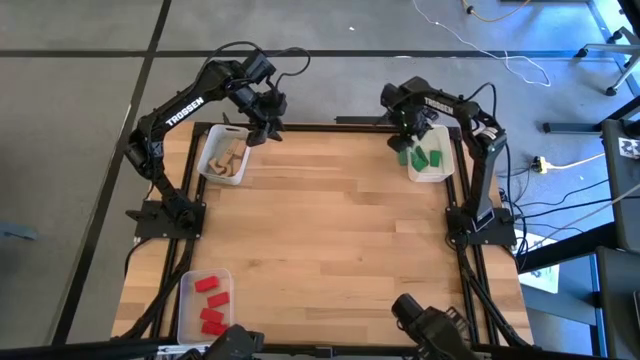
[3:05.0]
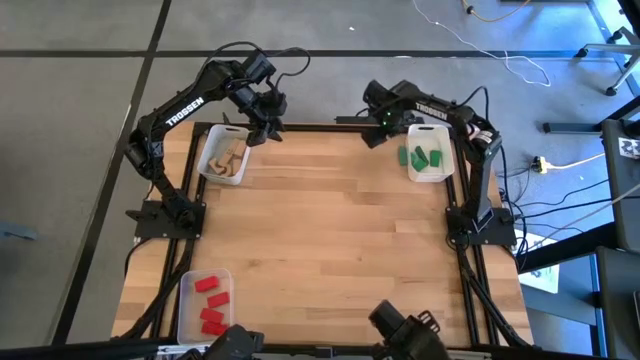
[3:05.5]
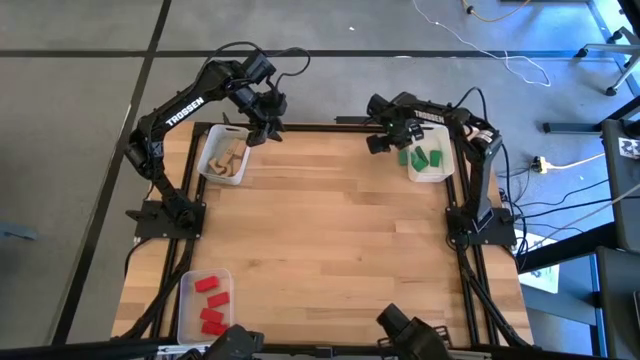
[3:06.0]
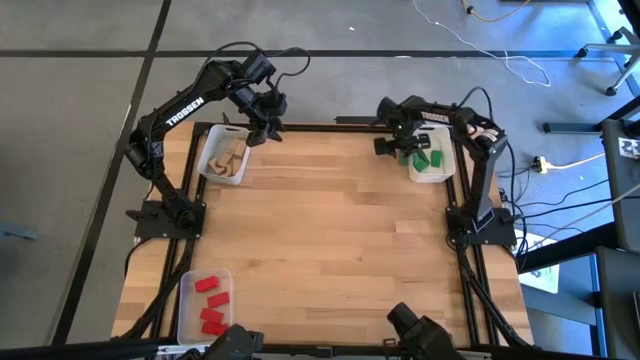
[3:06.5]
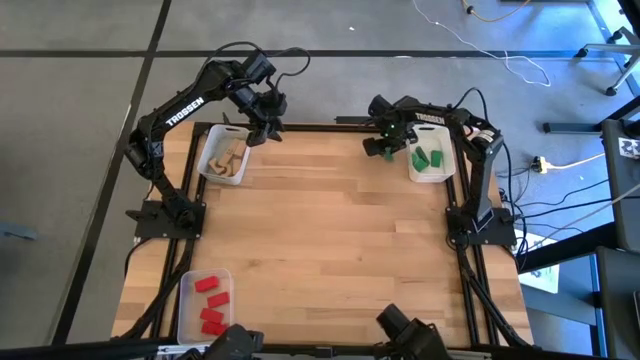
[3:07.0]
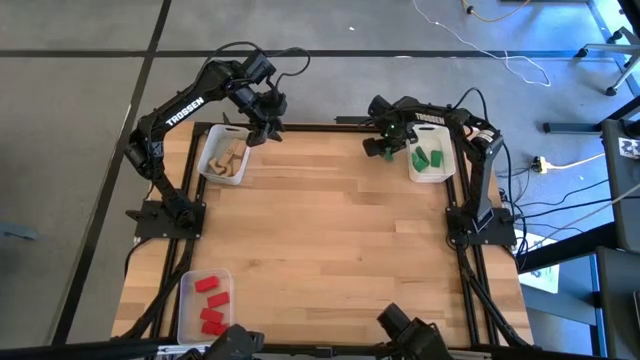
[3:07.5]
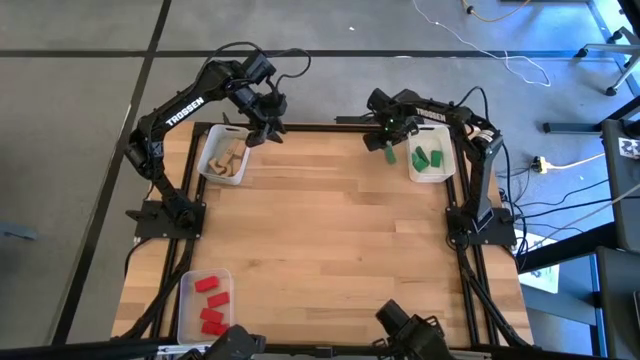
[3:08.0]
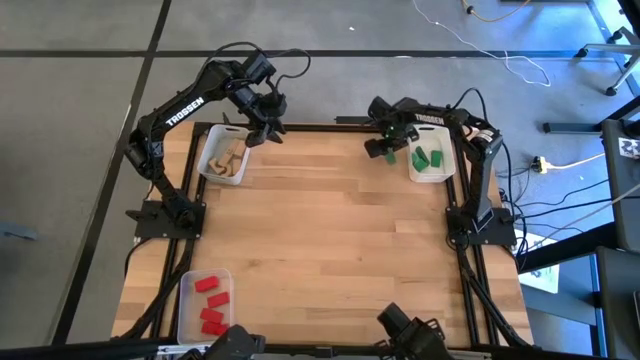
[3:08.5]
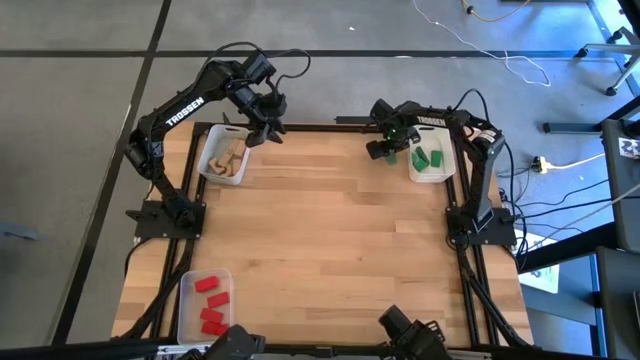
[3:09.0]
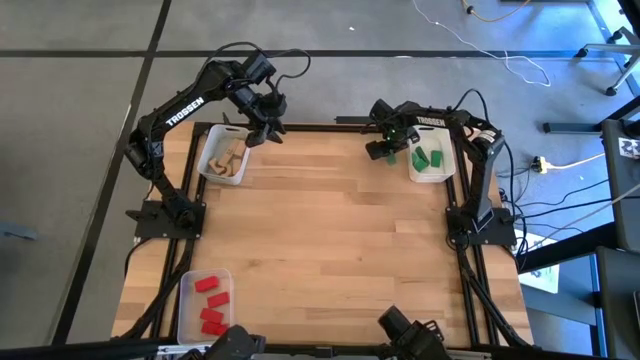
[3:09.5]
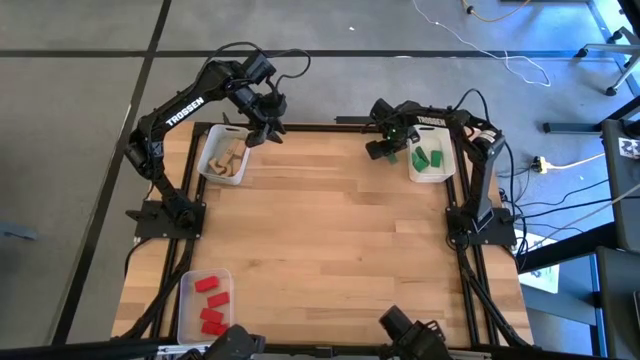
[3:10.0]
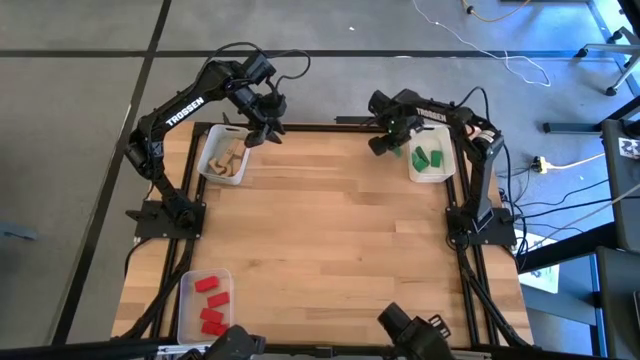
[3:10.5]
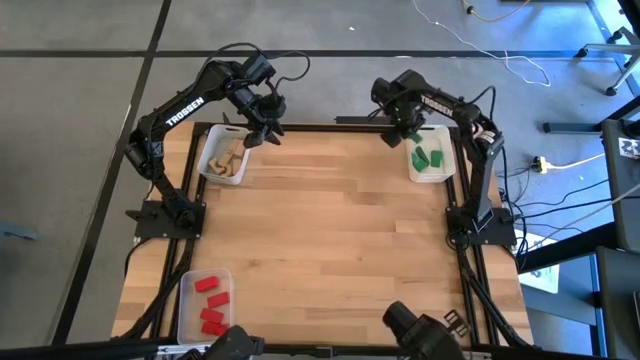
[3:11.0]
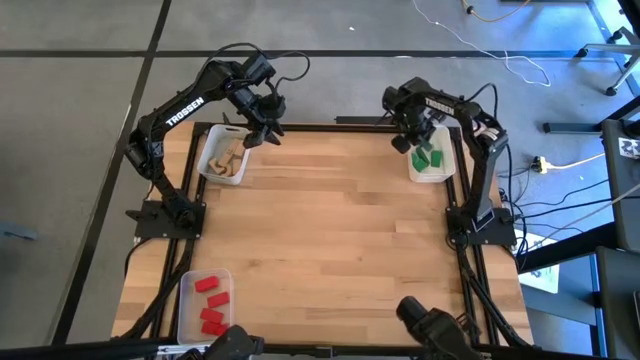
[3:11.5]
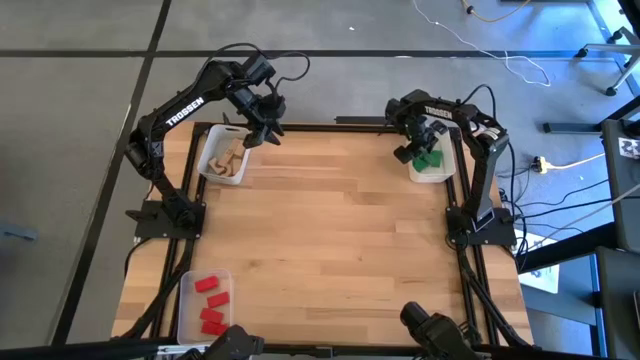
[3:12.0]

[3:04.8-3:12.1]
Task: Sort & place blocks by color
Put the green block into the white bin

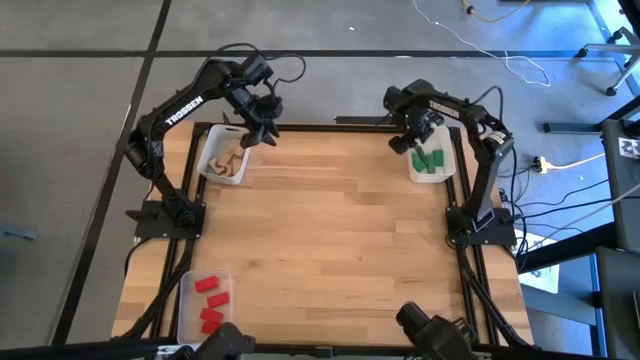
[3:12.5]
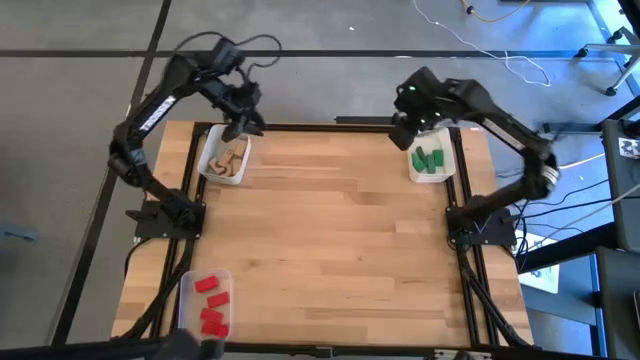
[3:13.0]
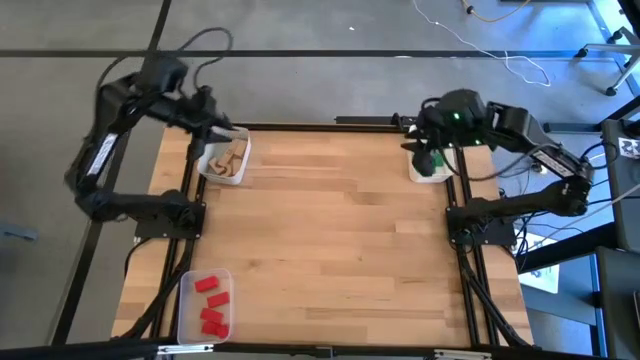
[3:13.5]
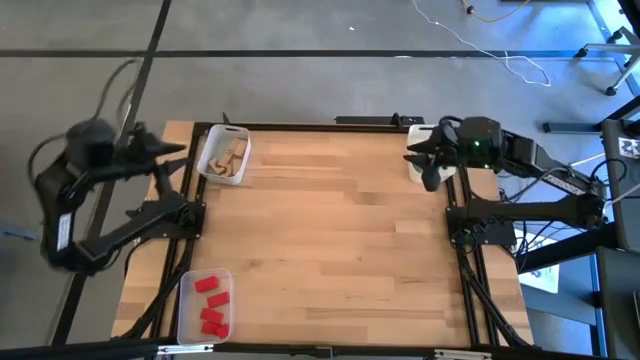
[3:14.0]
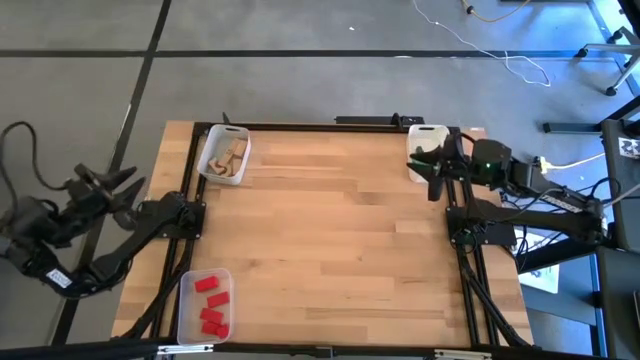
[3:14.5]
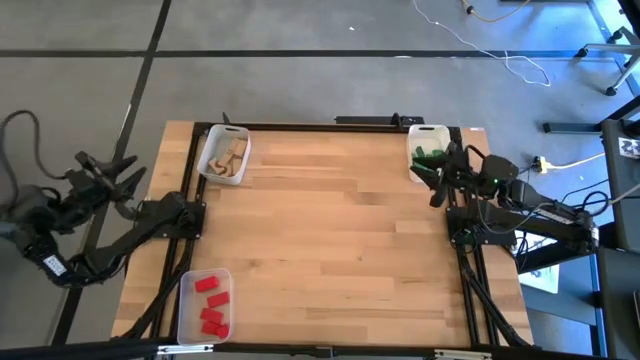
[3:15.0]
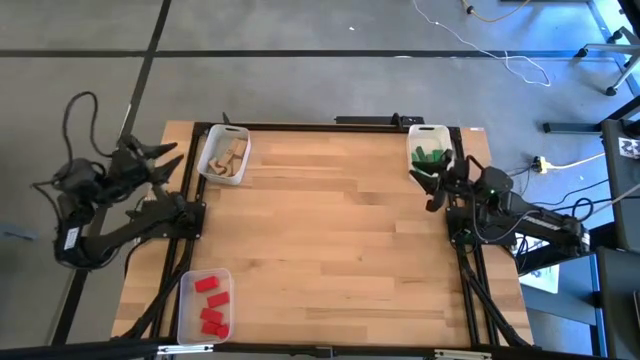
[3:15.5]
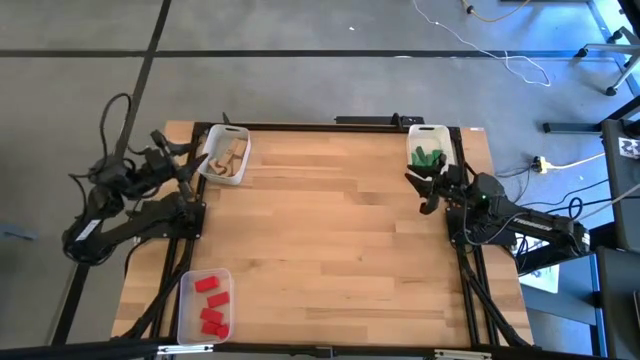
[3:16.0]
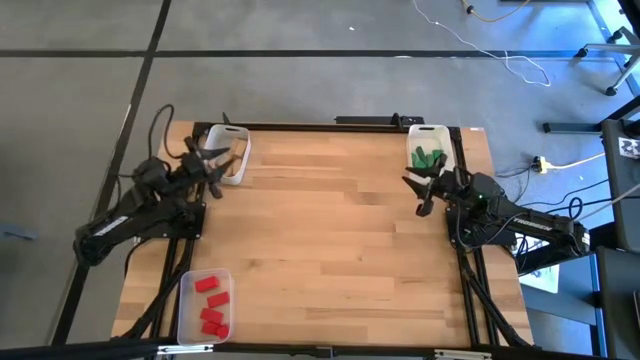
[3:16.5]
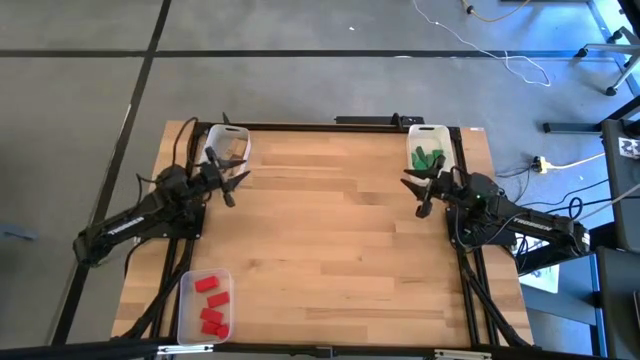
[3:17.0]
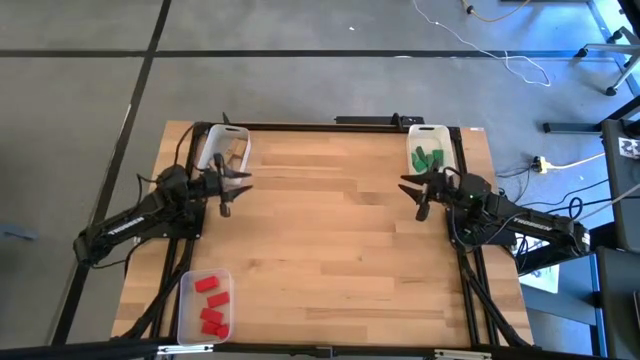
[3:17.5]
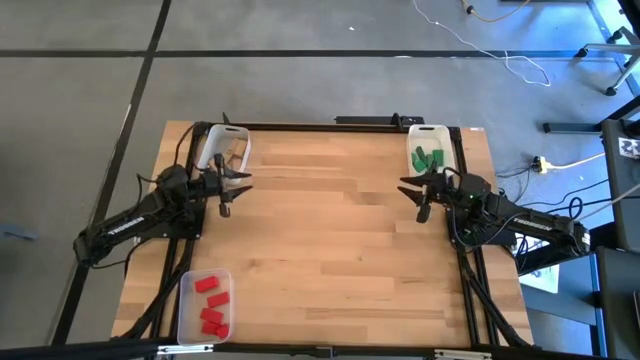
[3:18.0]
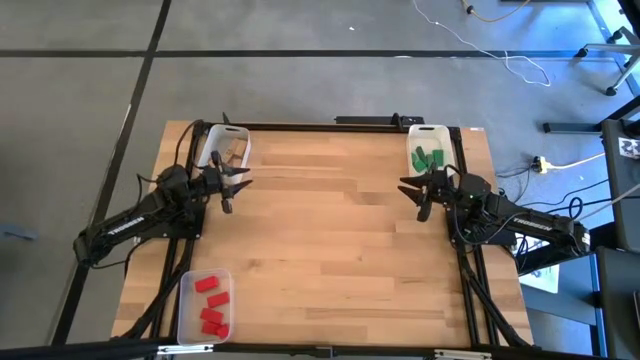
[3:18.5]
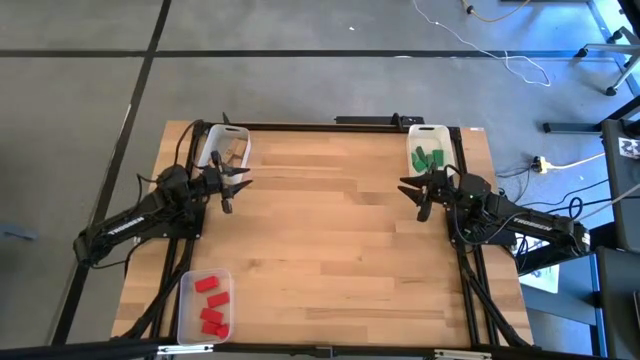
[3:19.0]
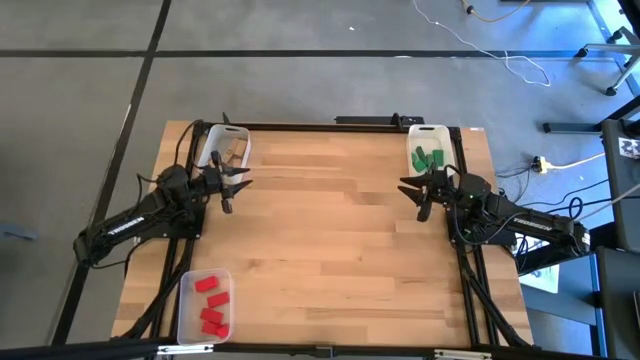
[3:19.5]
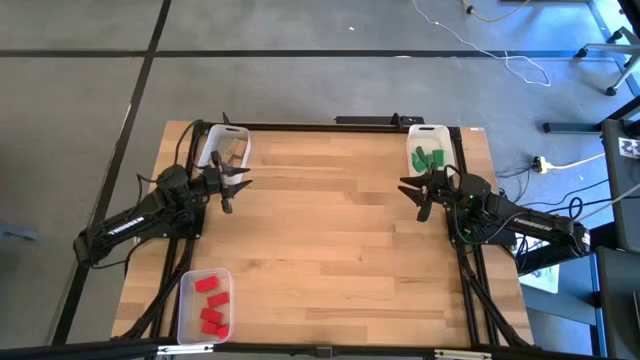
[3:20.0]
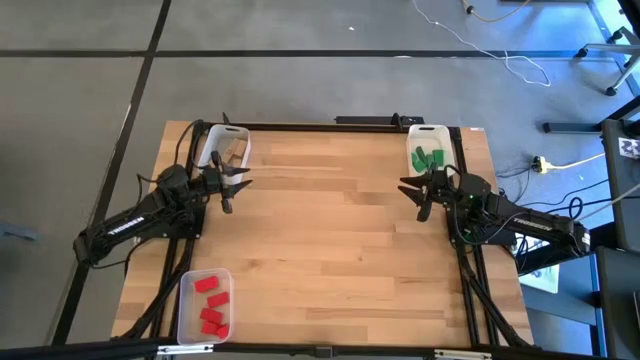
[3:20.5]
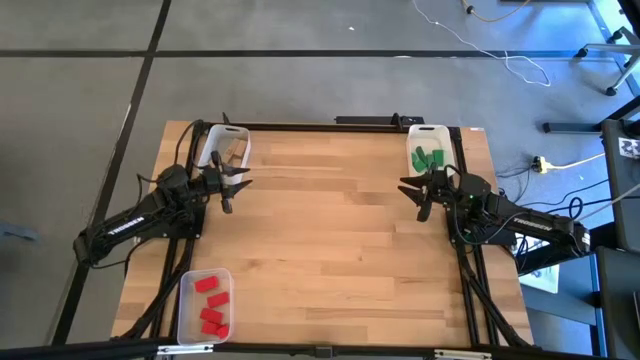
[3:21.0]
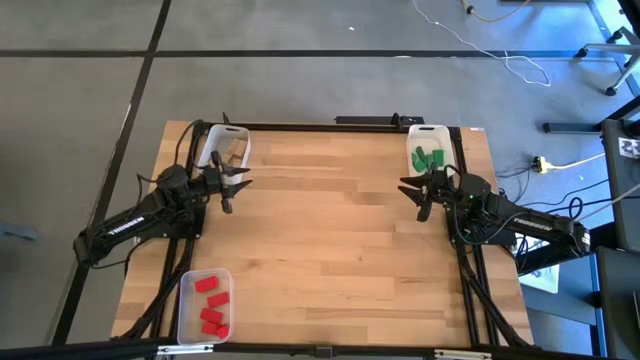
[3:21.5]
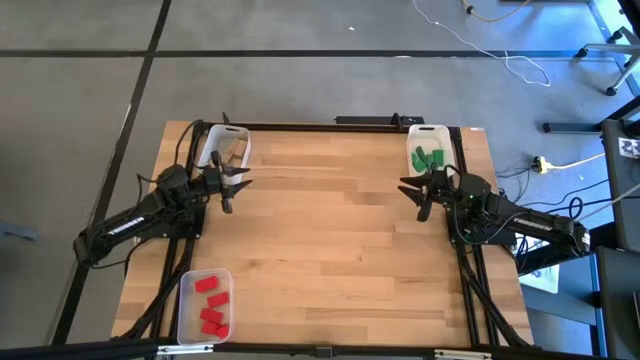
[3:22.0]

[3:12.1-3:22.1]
Return to Home Position

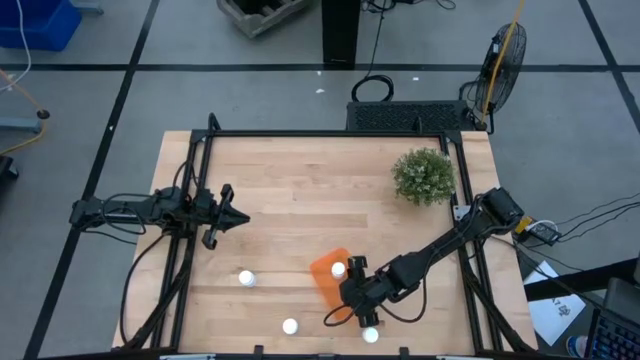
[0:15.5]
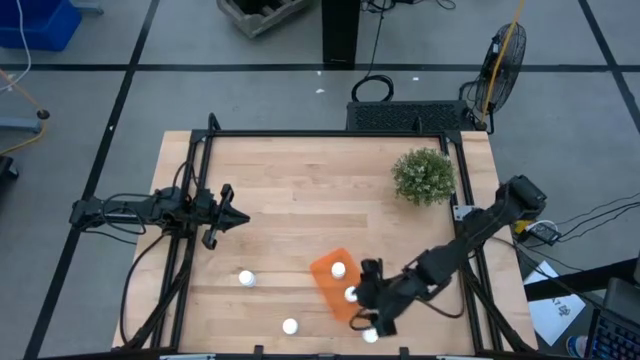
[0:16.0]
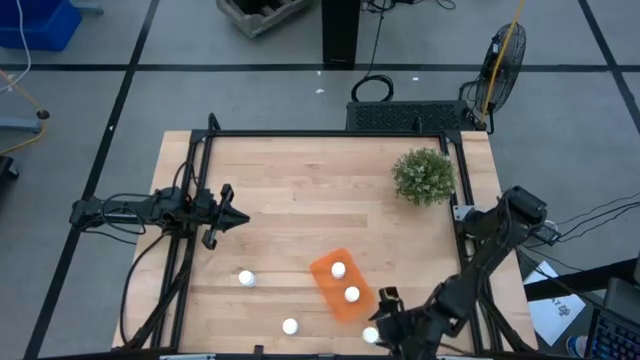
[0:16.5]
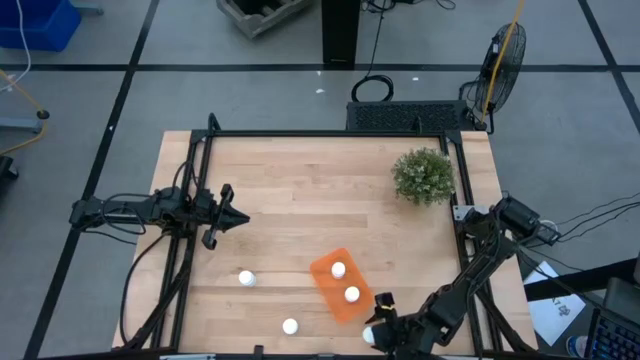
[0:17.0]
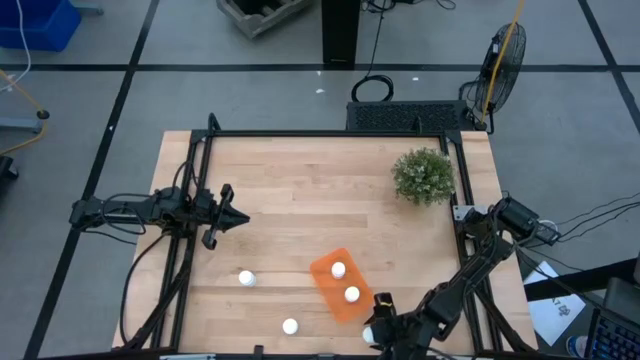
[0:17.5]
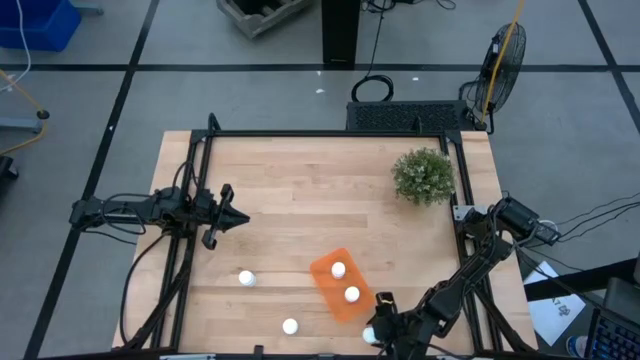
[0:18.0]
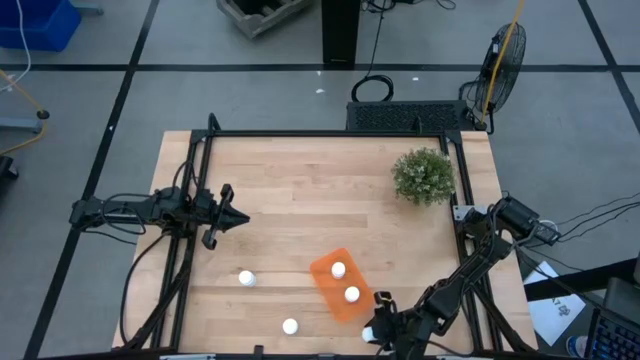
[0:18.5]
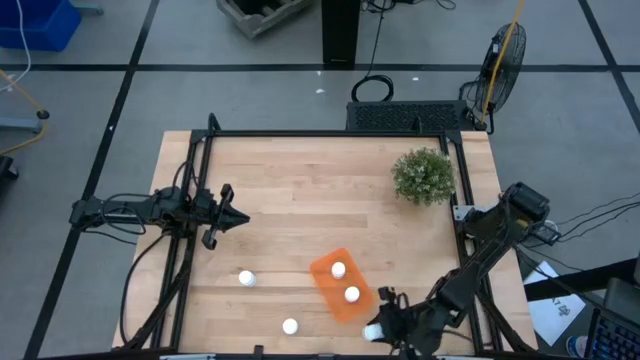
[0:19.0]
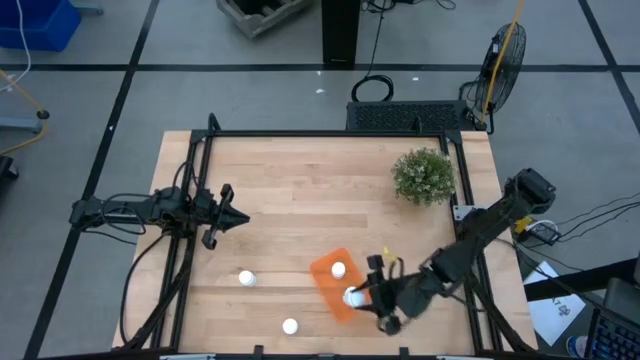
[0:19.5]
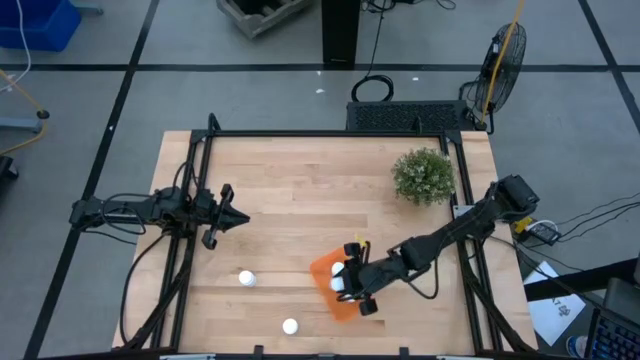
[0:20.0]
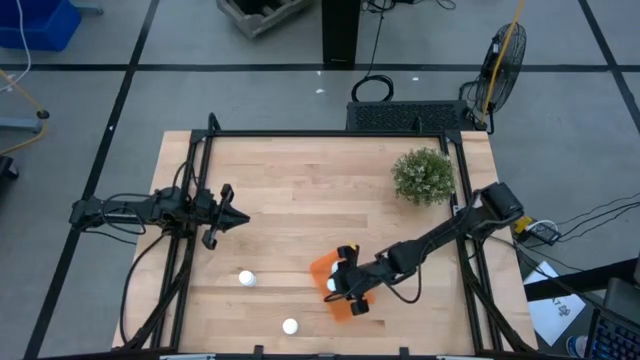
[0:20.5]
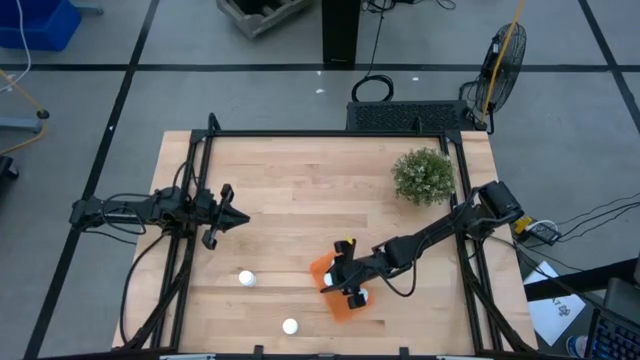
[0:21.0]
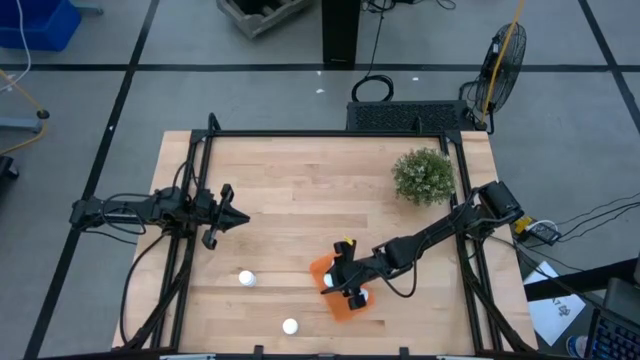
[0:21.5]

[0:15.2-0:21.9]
Task: Pick and place pill bottles into a basket
Put the white pill bottle into the orange bin
